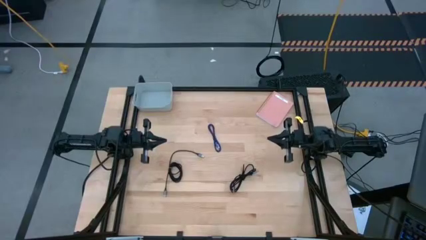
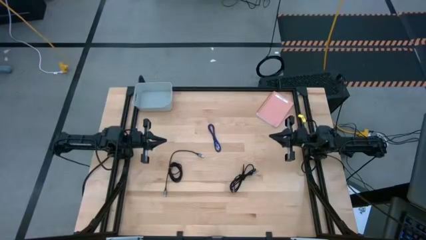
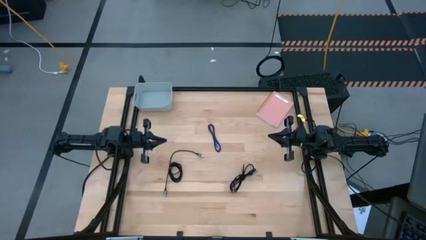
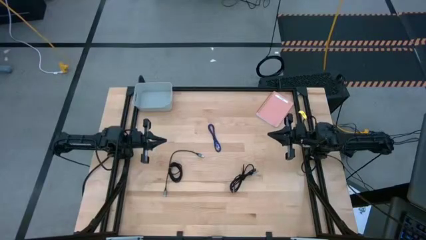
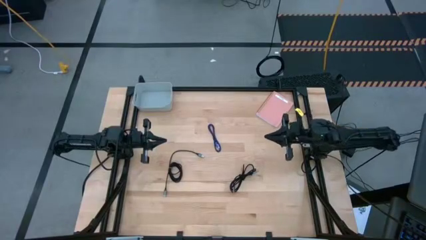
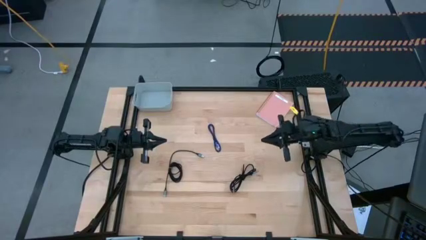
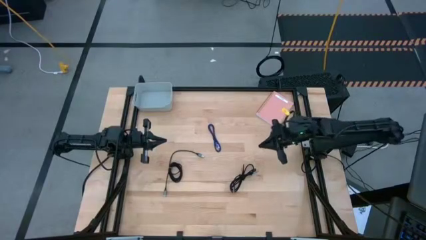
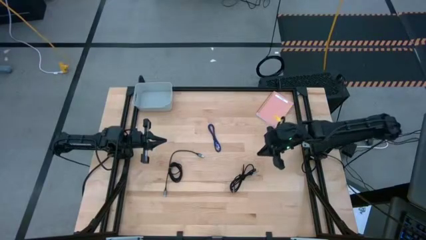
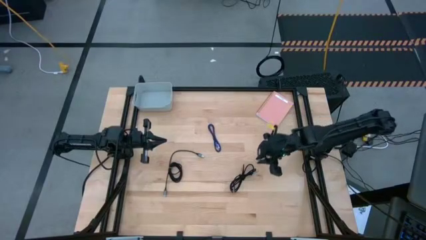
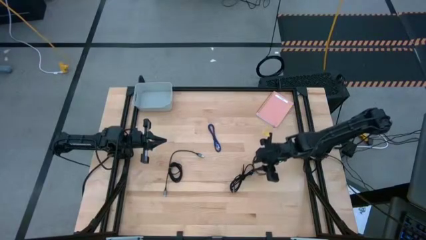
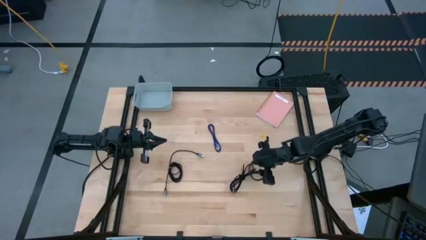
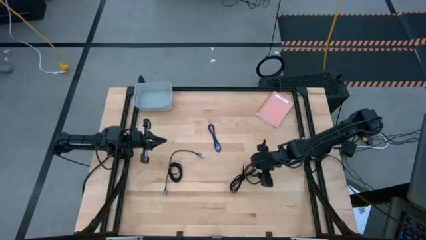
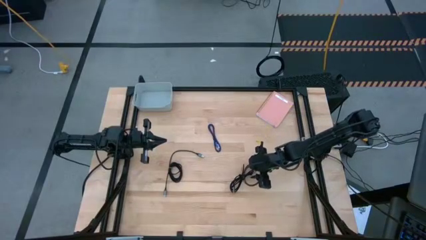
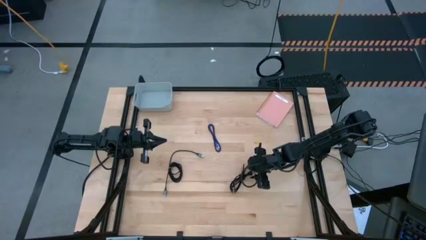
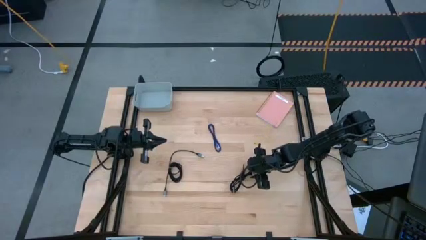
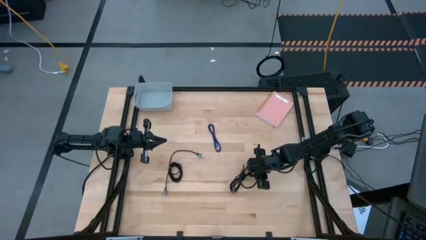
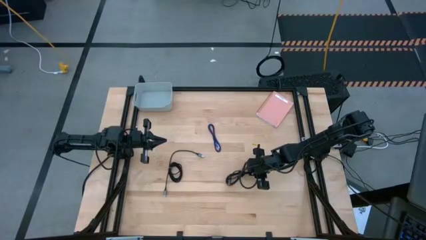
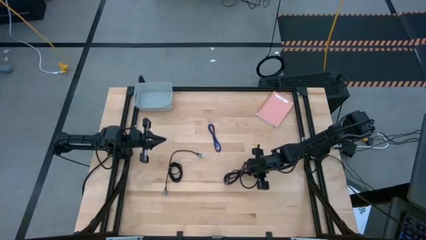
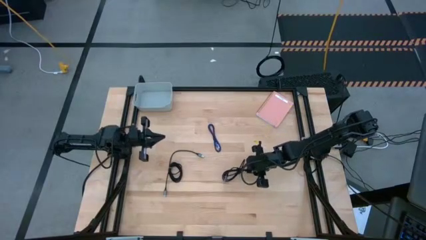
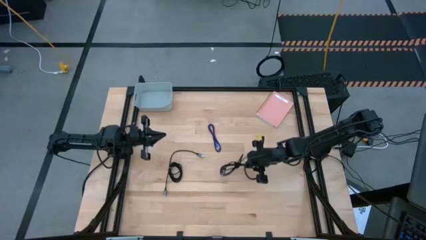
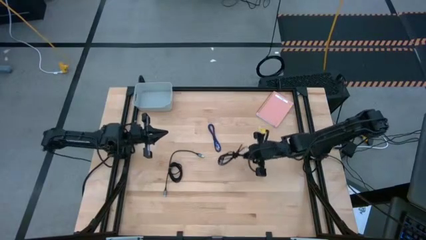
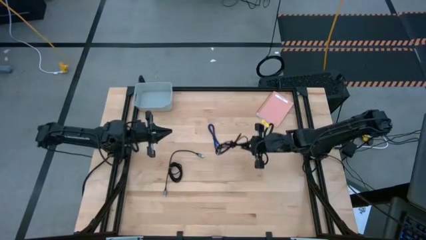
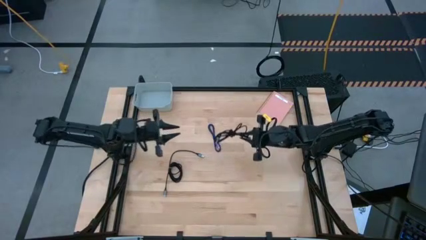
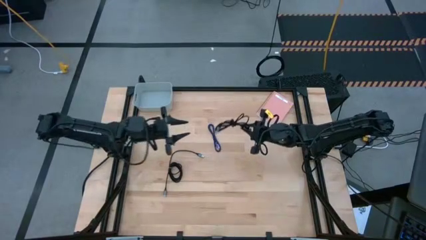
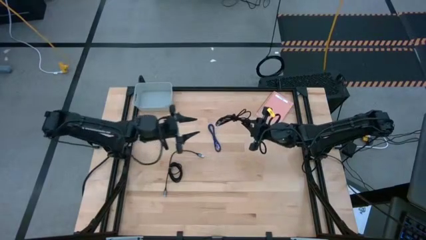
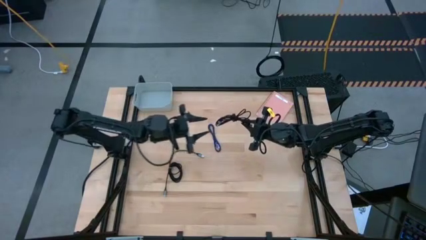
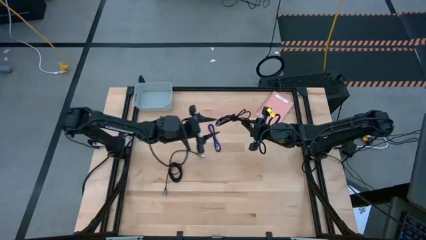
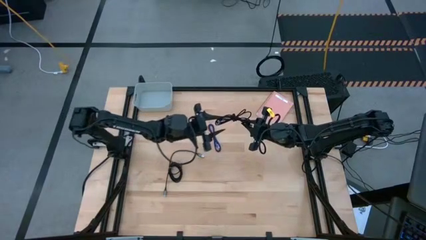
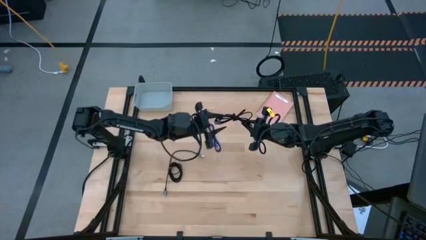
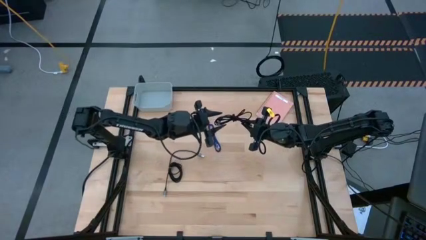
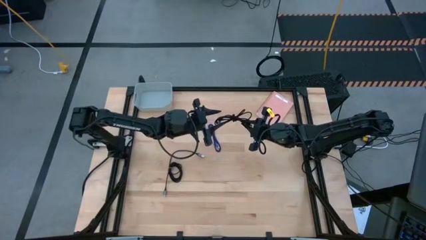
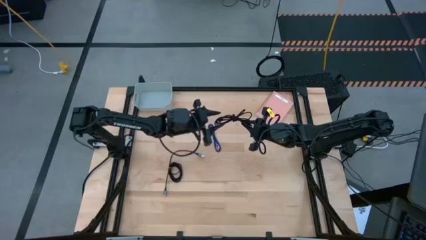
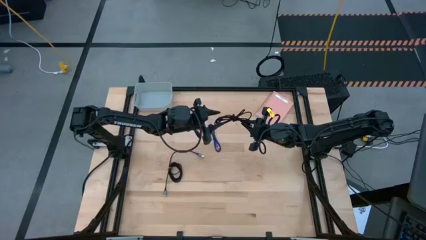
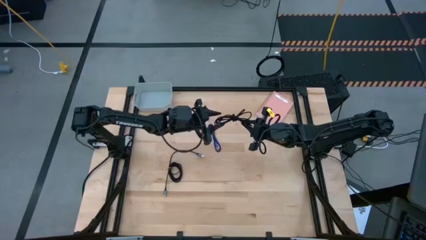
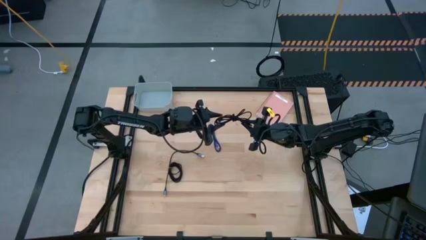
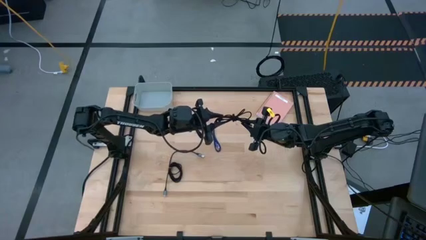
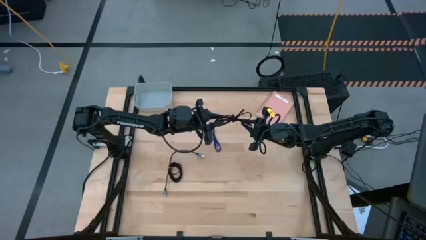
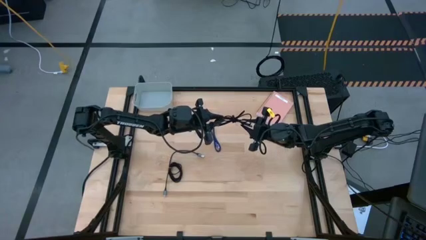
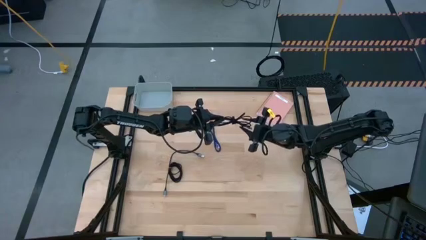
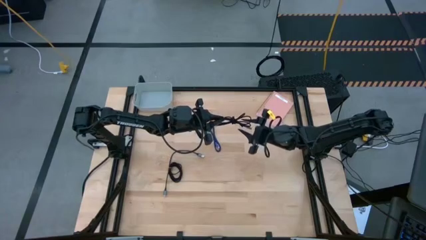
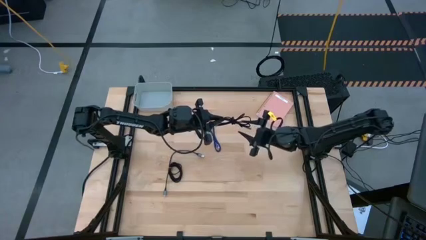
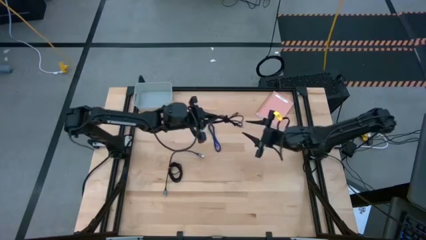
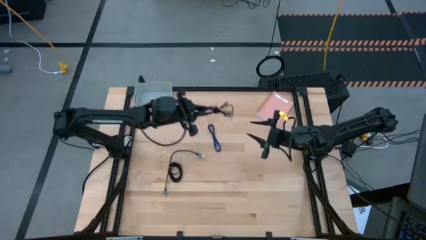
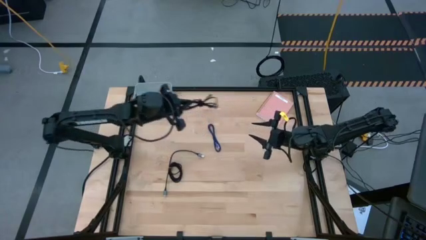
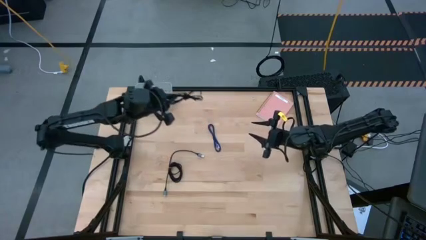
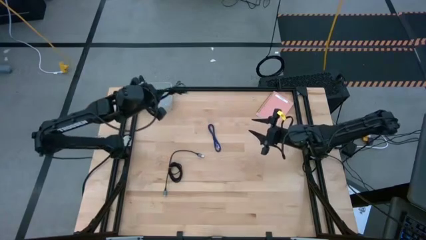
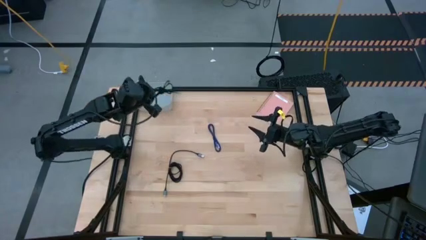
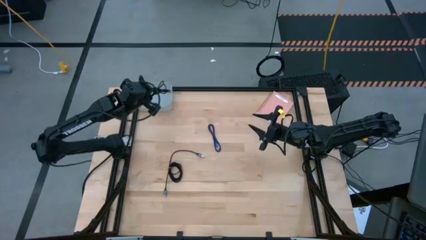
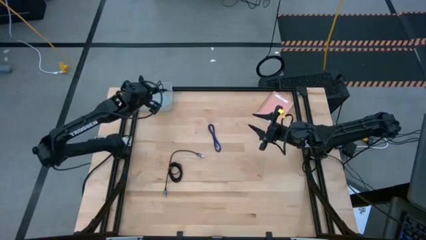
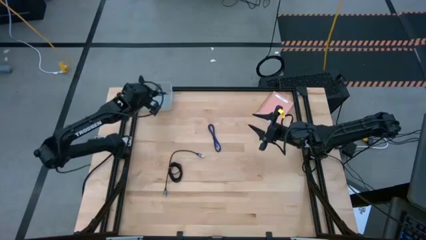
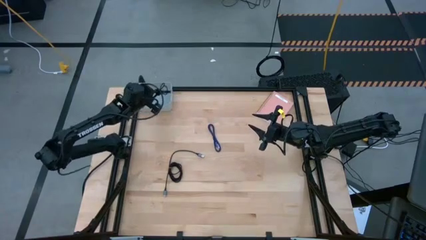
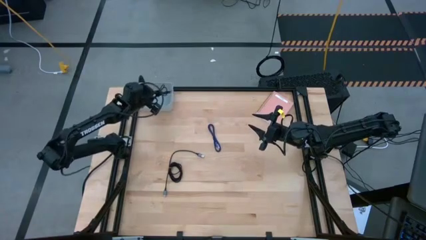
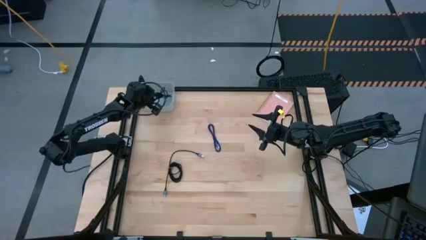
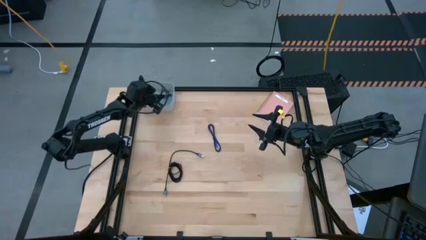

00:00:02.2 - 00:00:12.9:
Task: Pick and place USB-C Cables
Put the right black charger cable into the white bin
